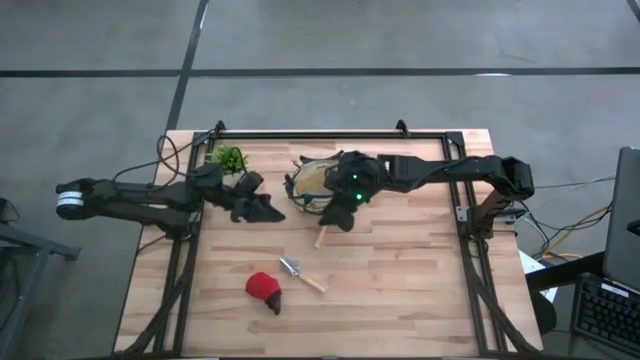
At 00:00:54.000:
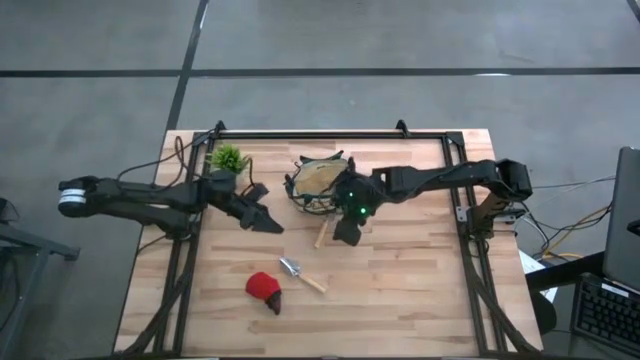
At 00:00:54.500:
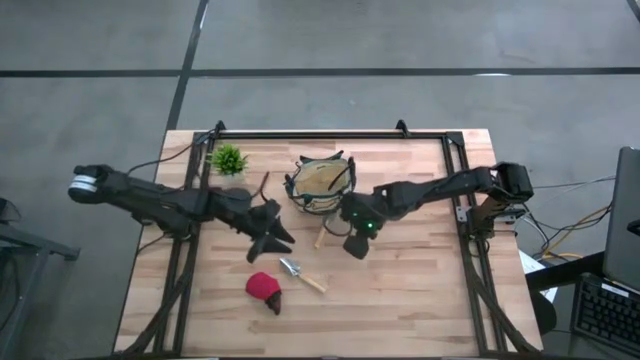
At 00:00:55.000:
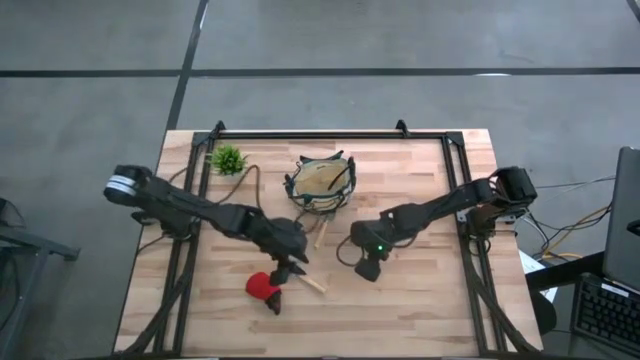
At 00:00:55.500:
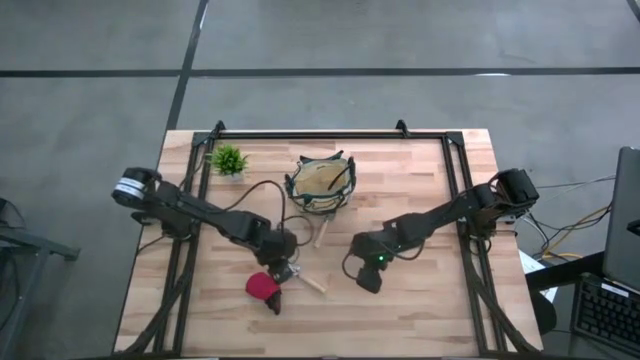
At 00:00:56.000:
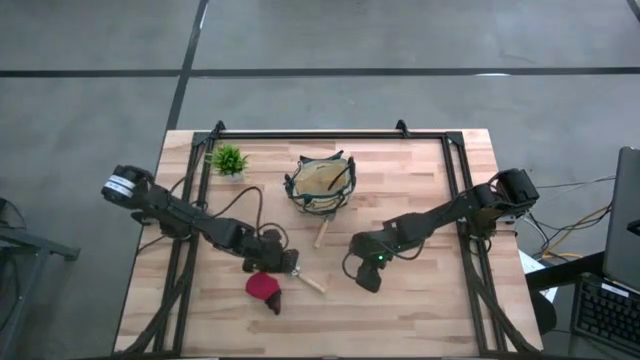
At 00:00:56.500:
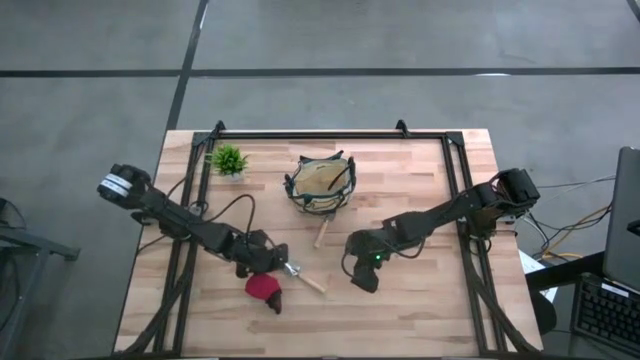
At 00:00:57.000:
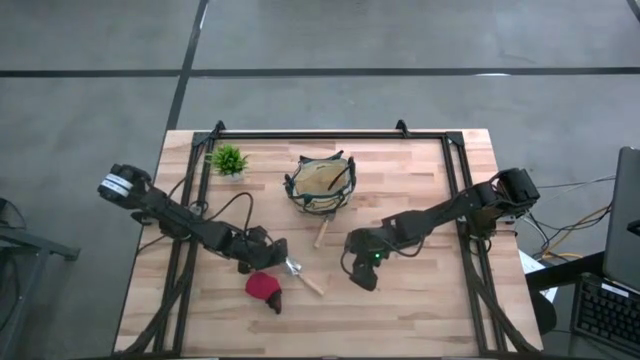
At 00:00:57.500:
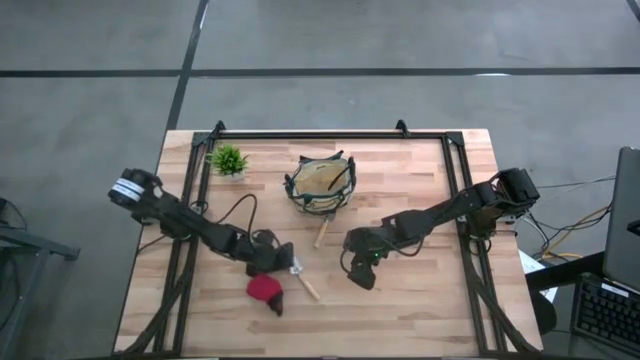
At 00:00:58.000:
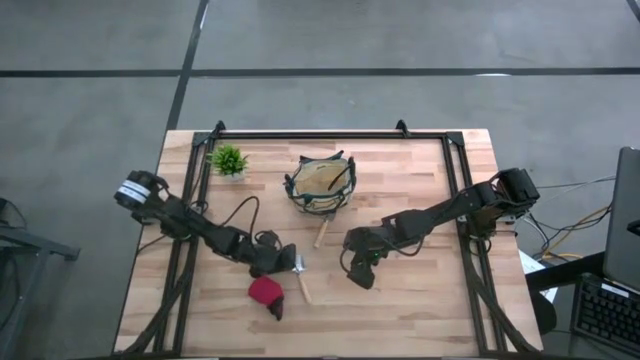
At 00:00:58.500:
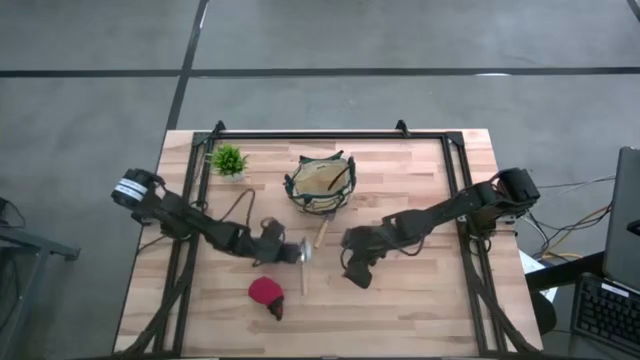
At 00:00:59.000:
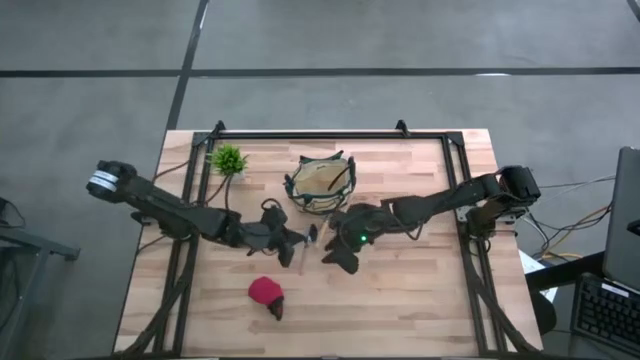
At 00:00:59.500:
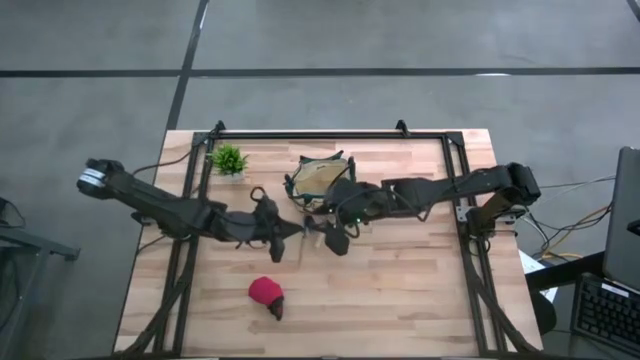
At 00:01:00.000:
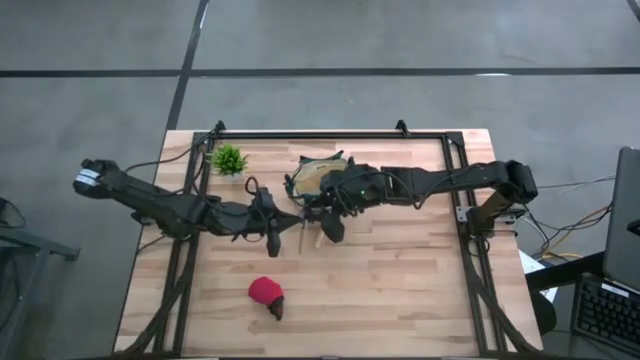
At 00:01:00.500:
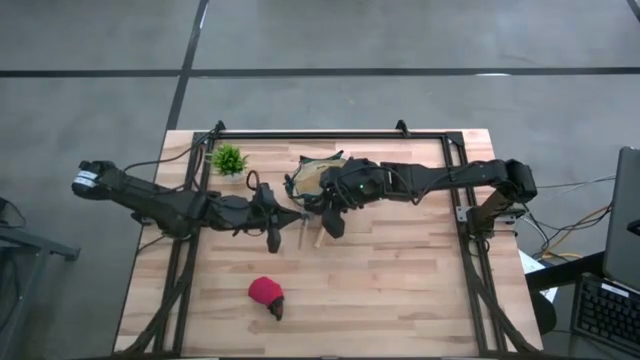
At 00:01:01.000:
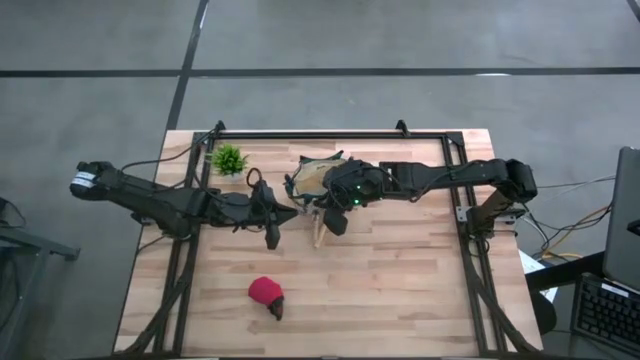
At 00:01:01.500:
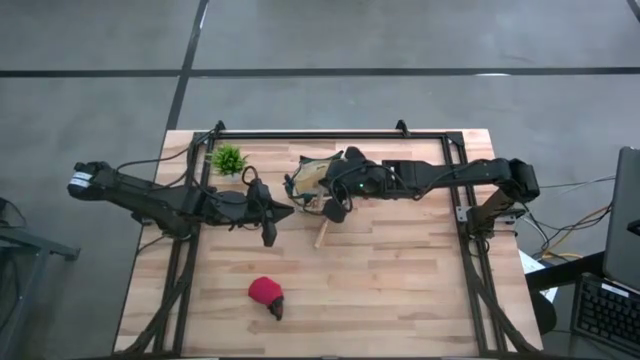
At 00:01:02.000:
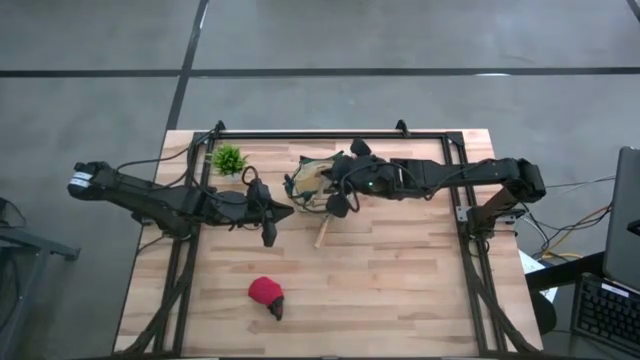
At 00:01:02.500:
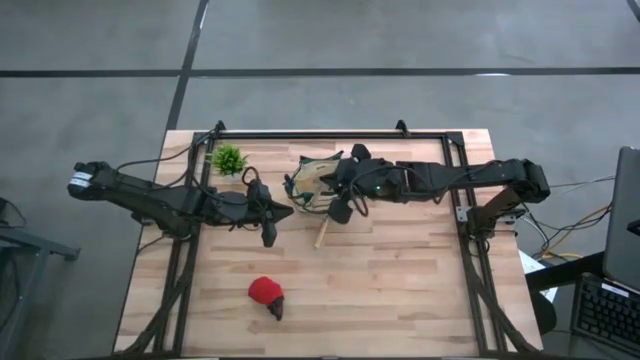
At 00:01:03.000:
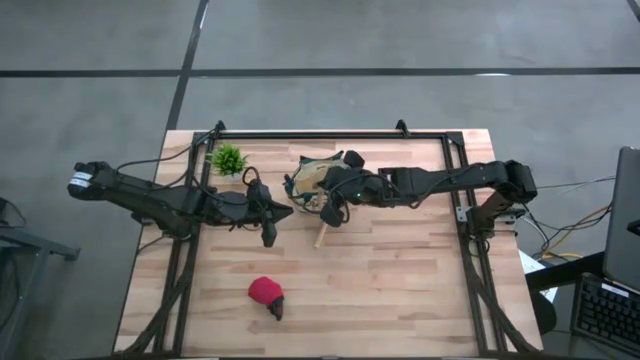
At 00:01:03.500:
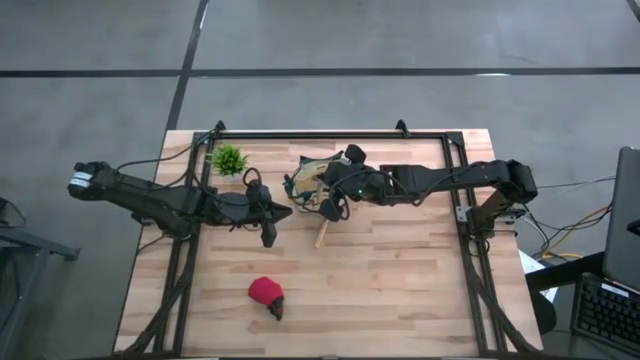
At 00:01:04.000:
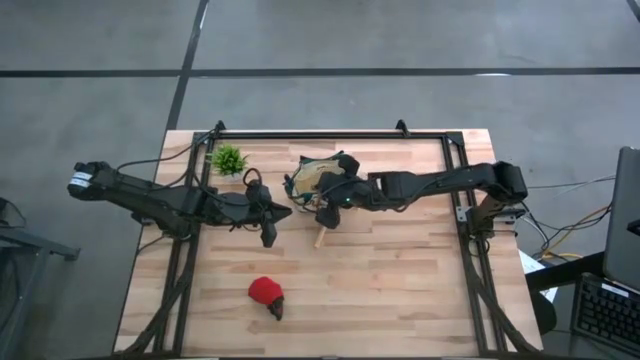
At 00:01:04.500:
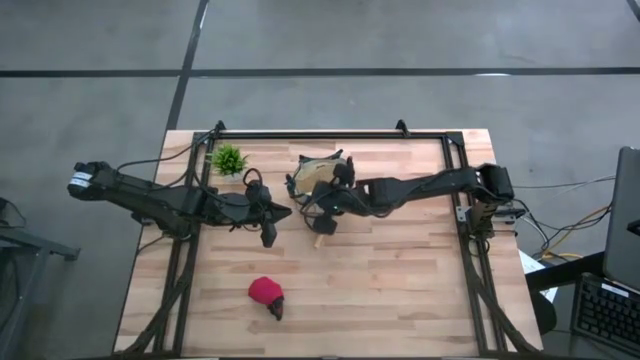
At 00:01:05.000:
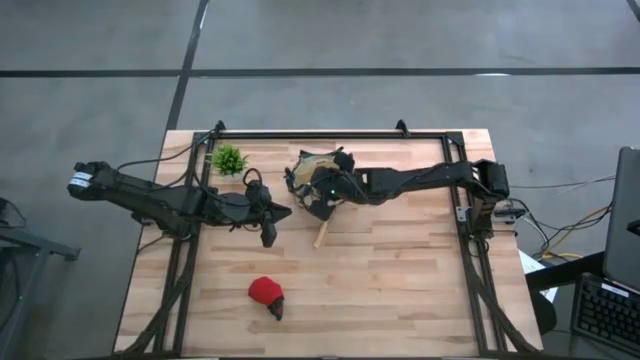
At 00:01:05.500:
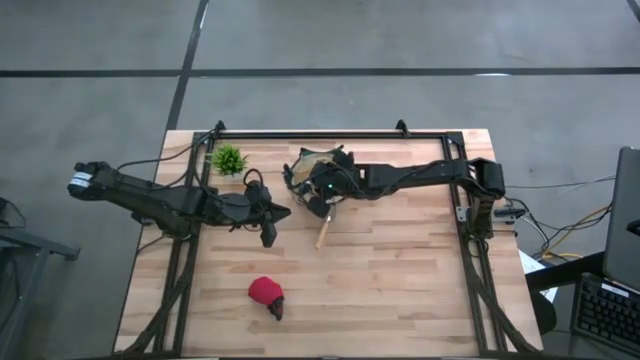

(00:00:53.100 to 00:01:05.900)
Task: Pick & Place Garden tools in Gardening bag
Put the bottom brown trowel into the brown gardening bag

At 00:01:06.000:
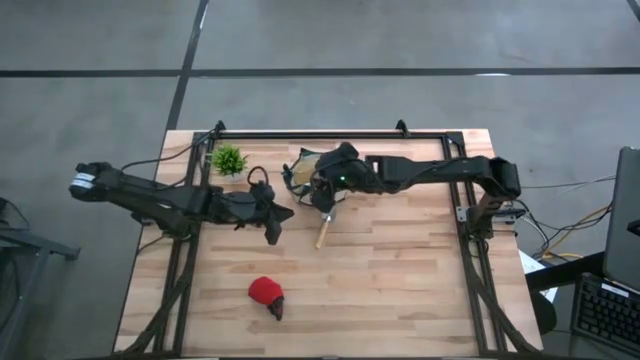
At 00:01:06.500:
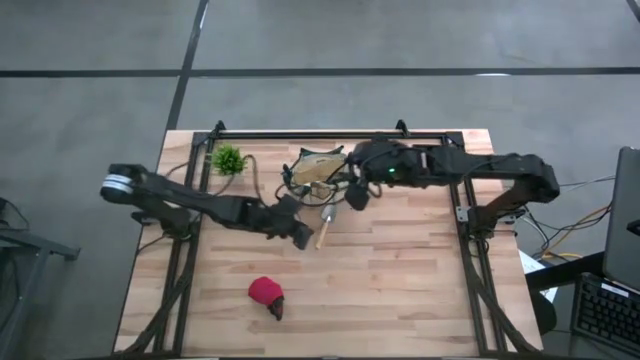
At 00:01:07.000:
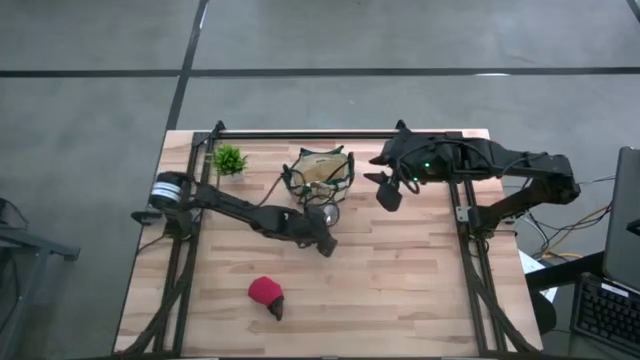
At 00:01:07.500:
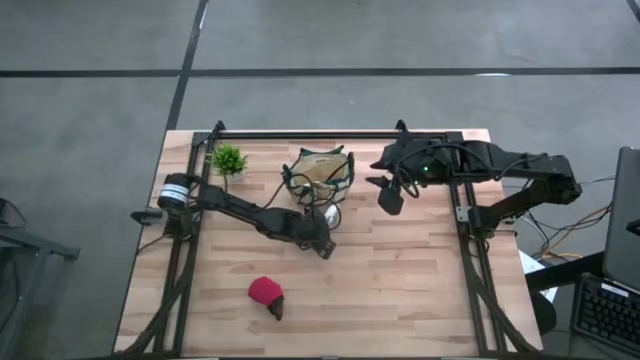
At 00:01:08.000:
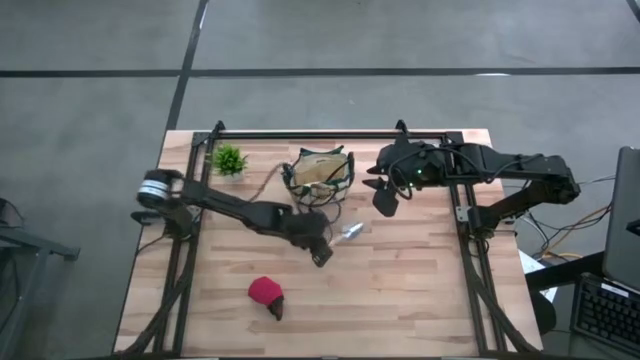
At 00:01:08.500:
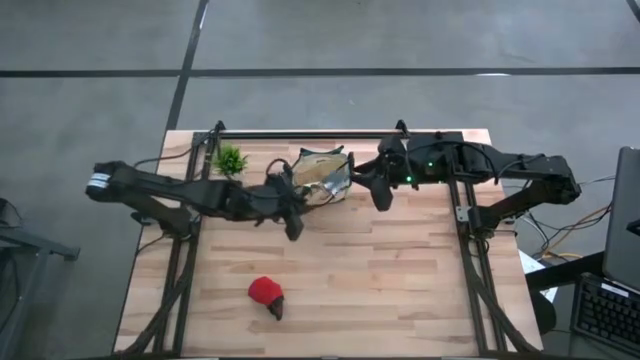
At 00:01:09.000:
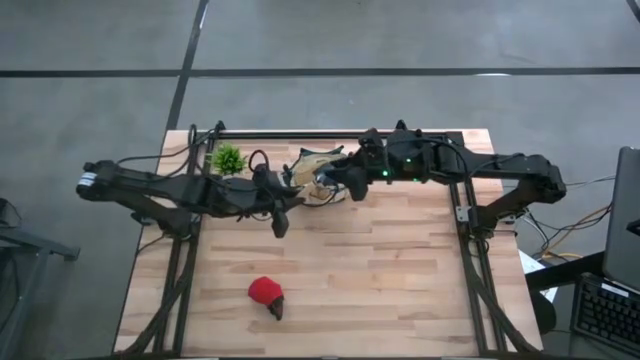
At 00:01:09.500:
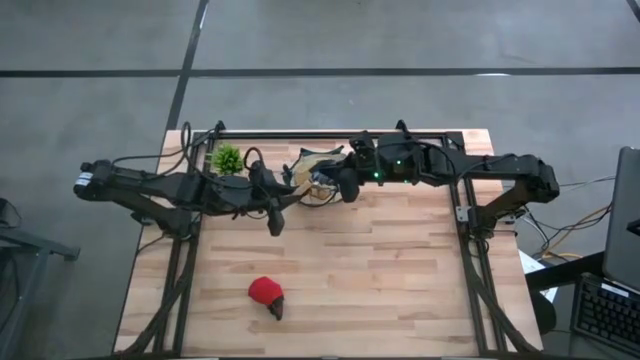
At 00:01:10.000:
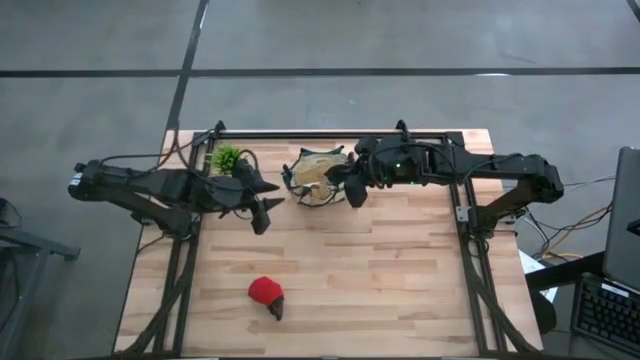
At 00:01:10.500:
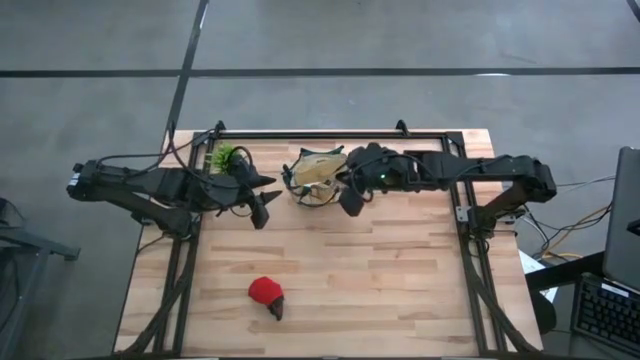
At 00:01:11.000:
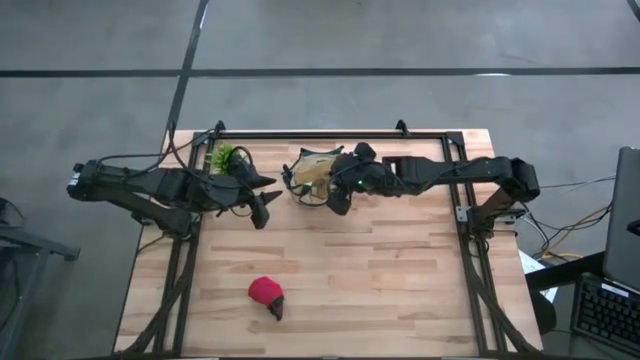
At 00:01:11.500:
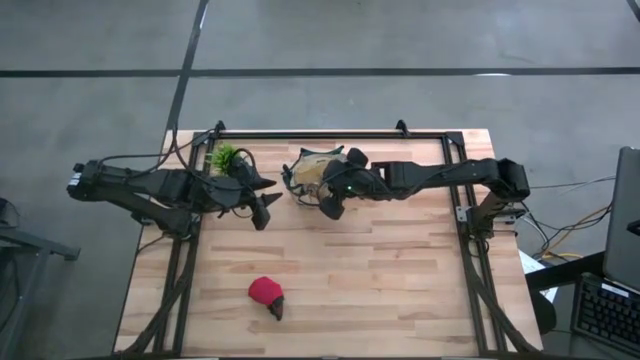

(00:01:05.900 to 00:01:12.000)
Put the brown trowel into the brown gardening bag

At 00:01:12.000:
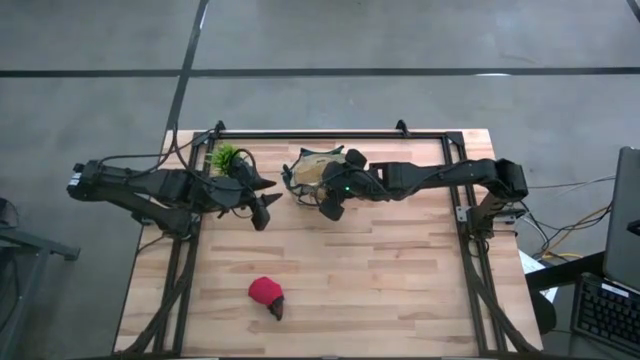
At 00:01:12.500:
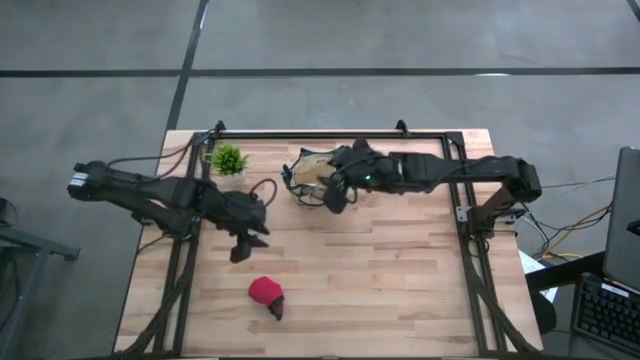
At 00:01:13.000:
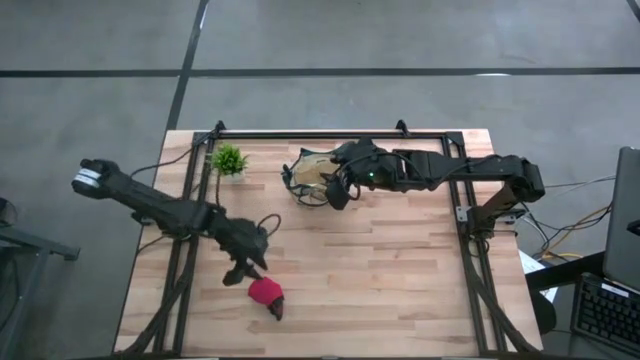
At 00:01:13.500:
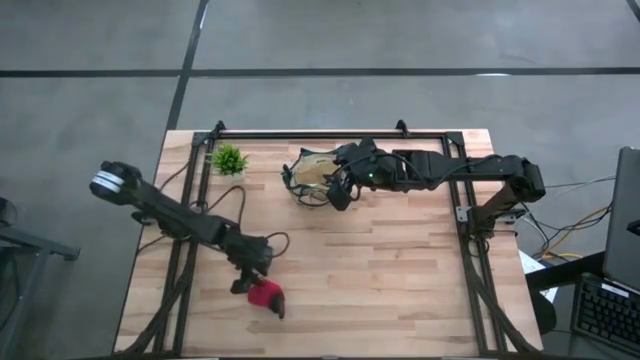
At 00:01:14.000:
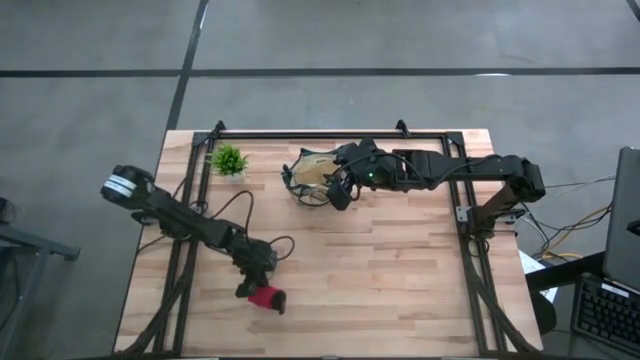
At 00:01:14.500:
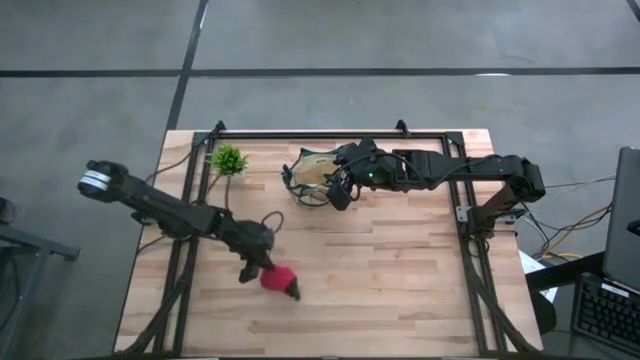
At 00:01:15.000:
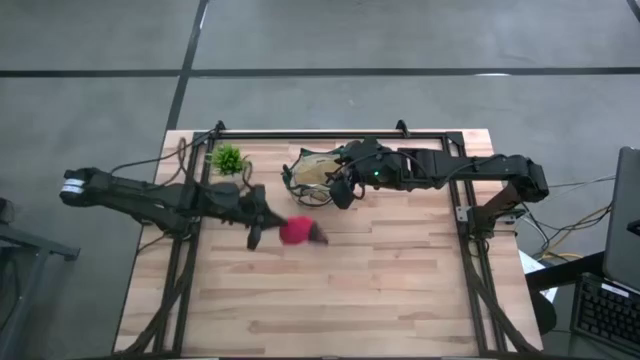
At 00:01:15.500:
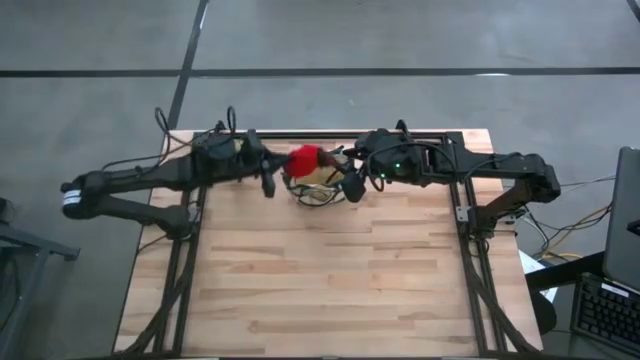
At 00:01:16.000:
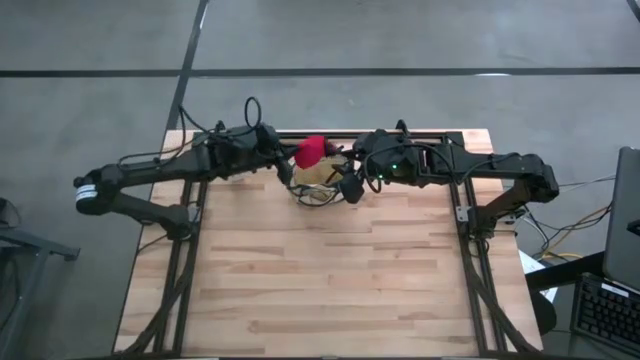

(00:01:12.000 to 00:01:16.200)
Put the red gloves into the brown gardening bag
